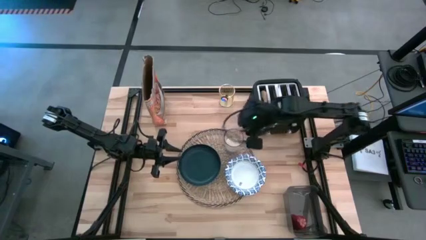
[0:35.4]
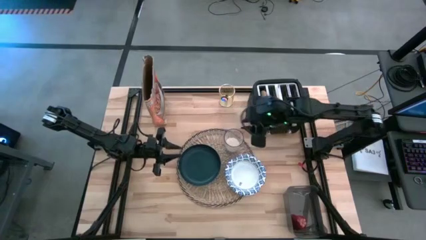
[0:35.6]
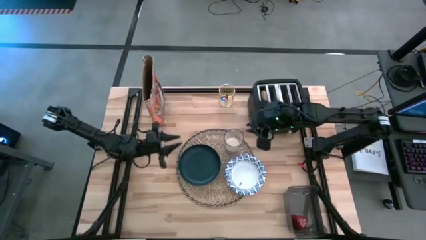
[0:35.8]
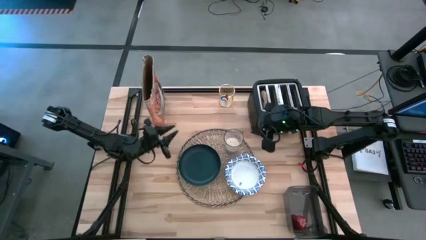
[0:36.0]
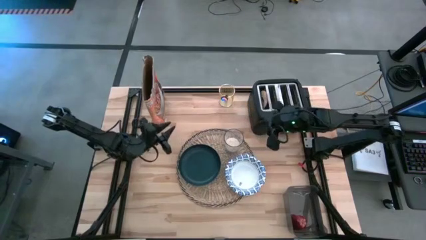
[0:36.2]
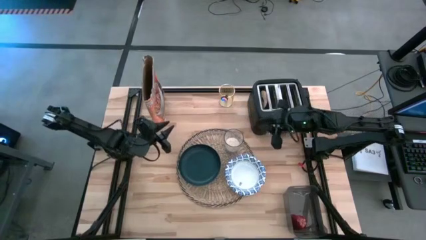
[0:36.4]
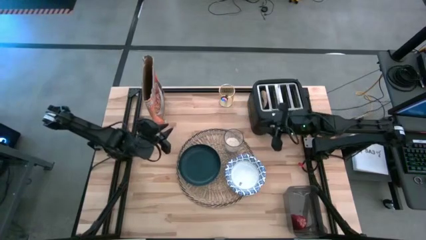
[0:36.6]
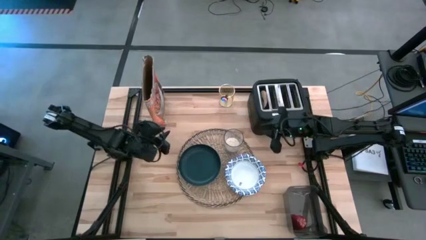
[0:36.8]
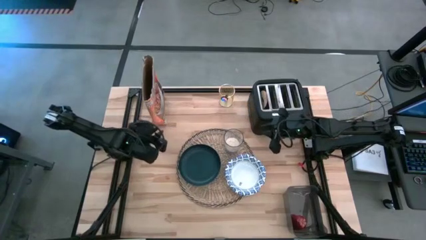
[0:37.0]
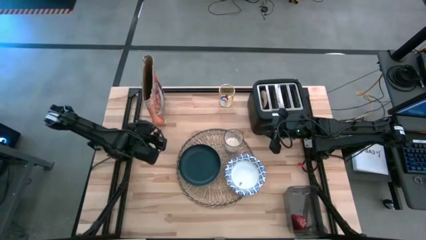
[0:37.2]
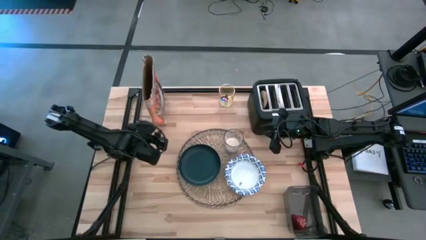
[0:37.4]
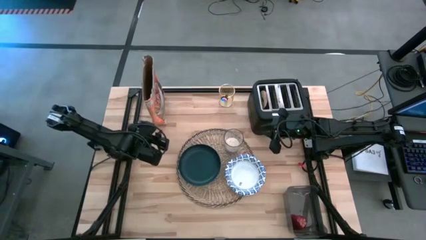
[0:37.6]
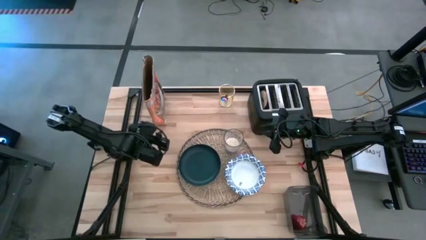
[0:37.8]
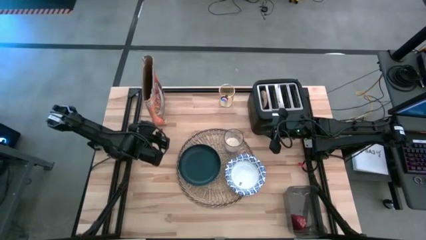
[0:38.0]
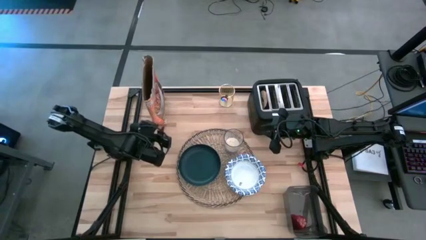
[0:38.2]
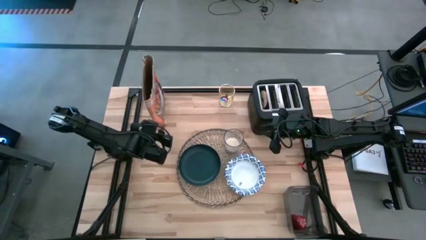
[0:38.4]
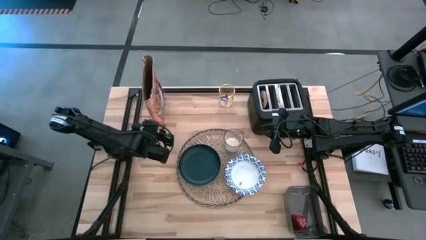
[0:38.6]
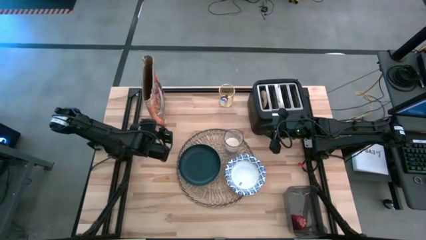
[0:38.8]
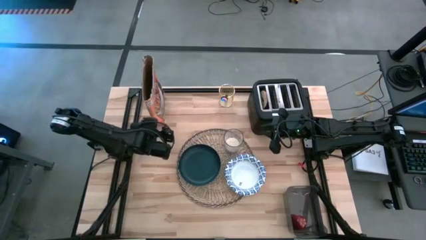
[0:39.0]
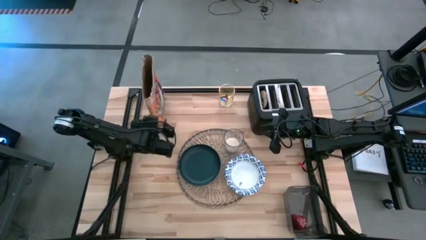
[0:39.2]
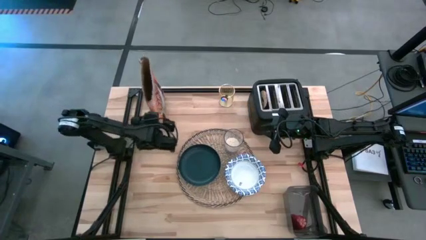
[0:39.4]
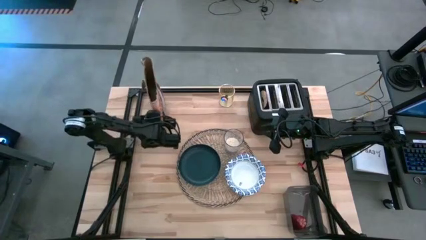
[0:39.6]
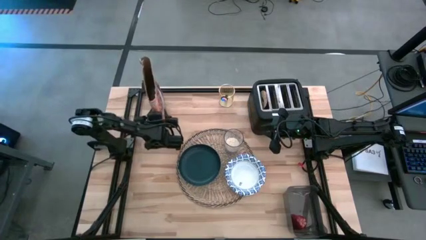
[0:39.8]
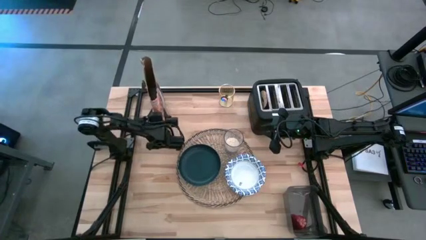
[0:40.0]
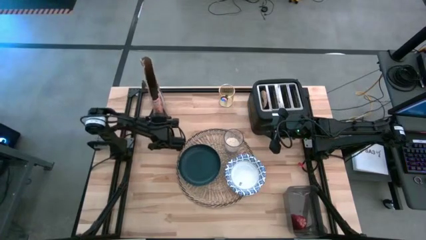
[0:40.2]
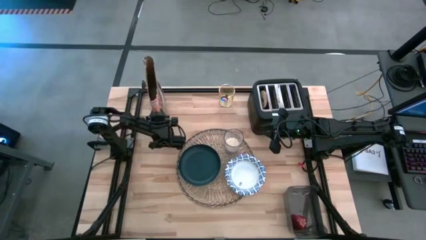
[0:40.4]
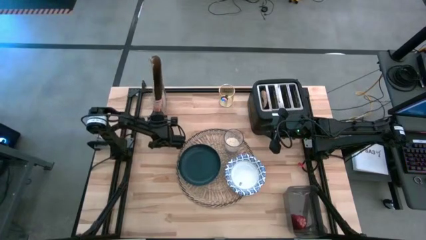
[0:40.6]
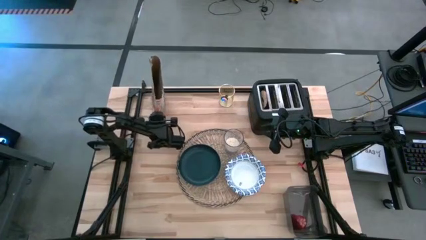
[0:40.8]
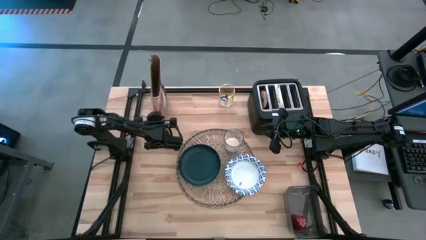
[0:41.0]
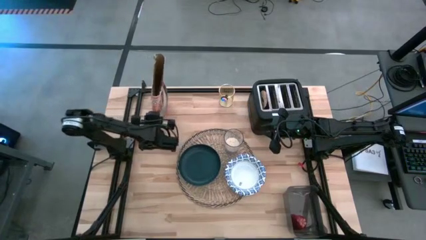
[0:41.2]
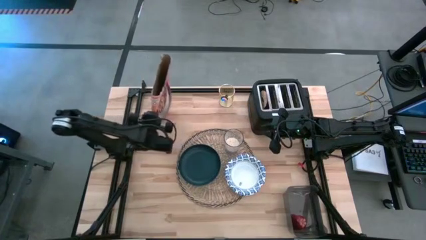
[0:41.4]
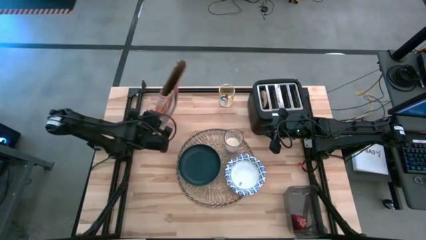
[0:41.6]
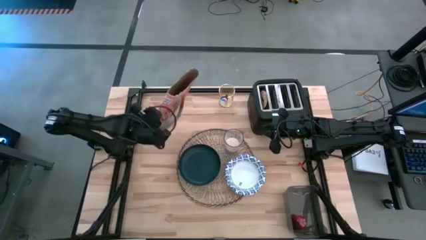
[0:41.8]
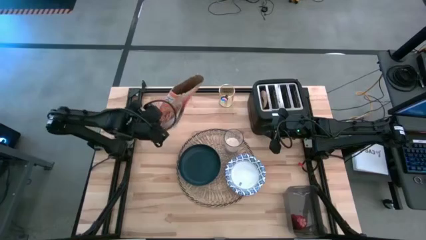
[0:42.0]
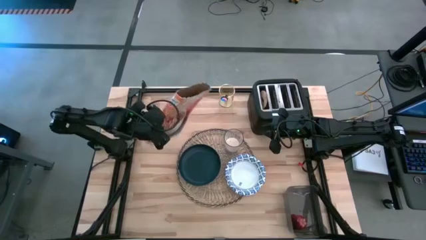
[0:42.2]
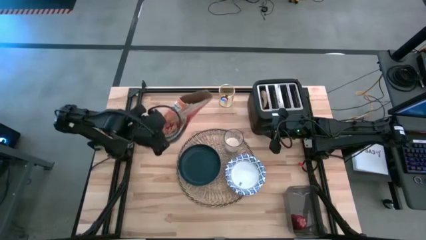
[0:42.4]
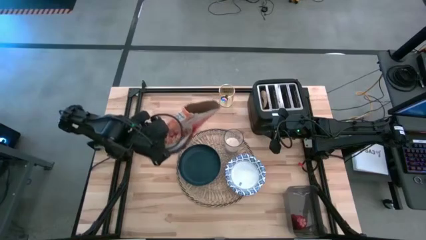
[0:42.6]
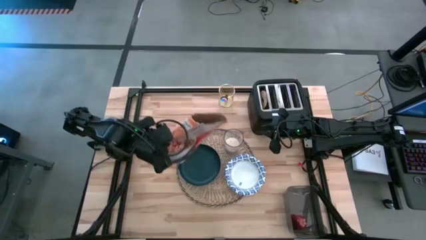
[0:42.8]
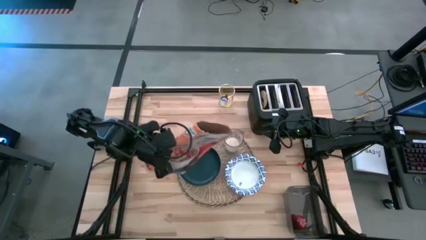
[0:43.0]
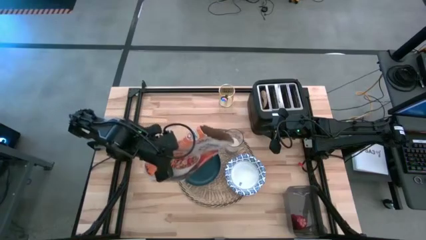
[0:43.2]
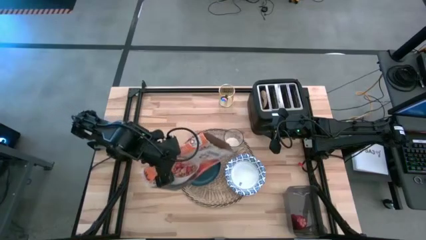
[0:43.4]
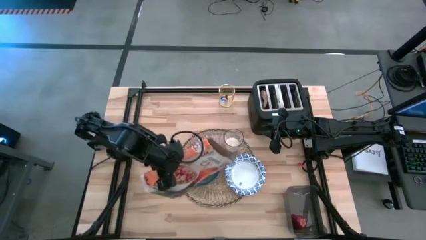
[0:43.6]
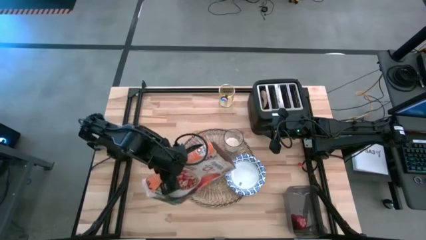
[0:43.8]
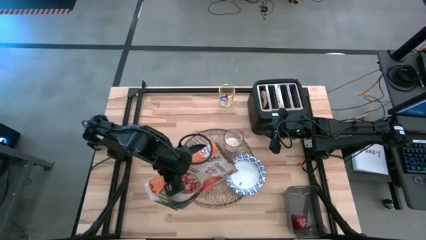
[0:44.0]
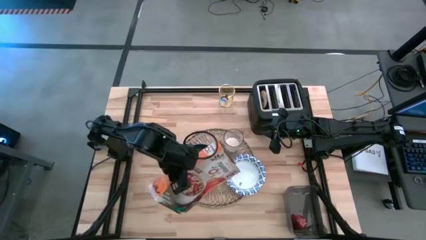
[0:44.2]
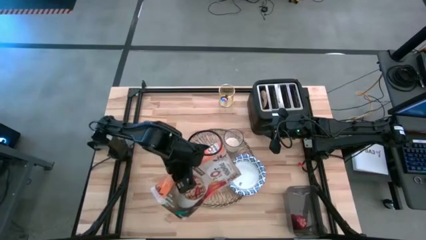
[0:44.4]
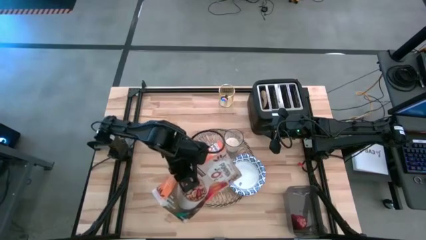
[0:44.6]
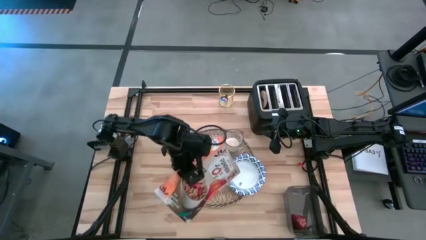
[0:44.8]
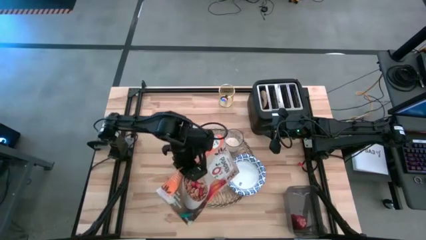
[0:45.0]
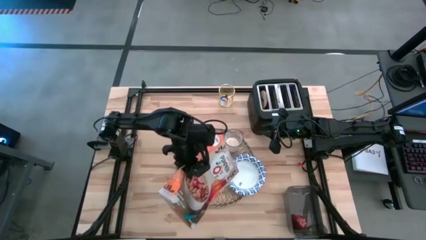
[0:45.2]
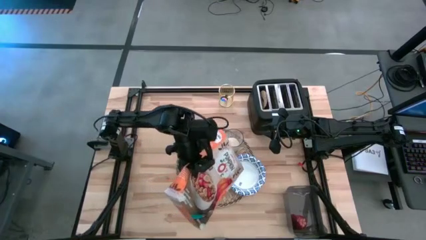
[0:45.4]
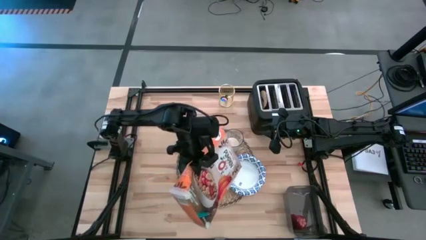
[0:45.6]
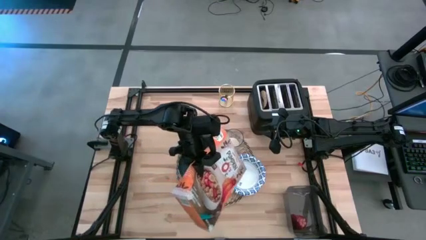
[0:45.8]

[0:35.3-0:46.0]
Task: Arrange a breakfast setting
Pour the cereal from the orange cereal box into the white patterned bowl
